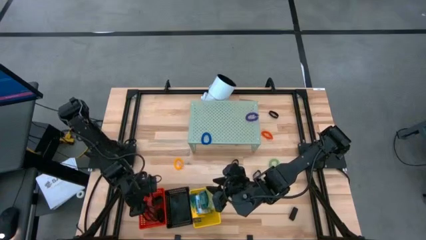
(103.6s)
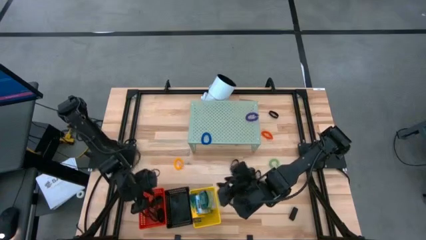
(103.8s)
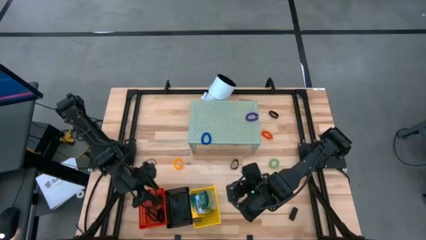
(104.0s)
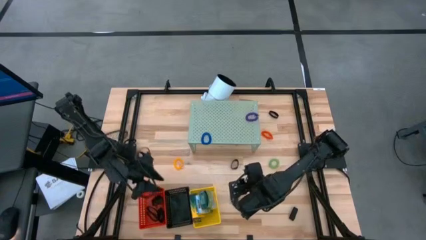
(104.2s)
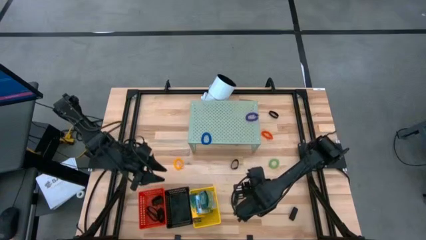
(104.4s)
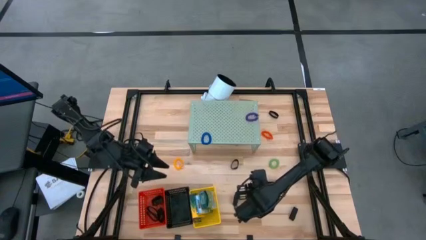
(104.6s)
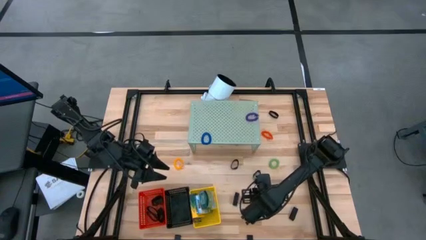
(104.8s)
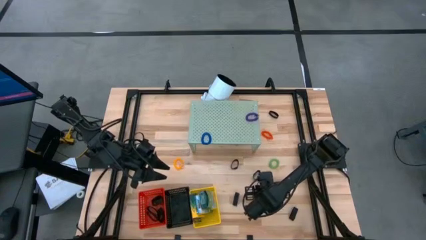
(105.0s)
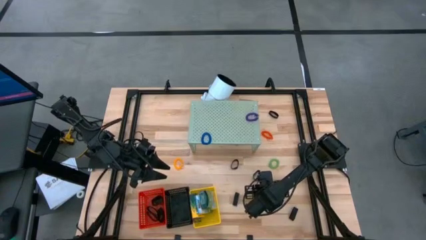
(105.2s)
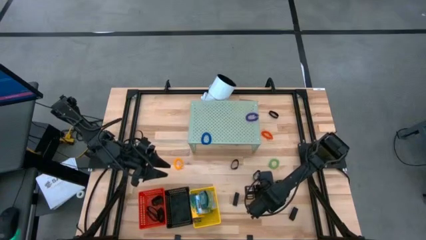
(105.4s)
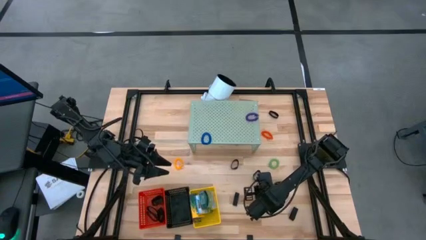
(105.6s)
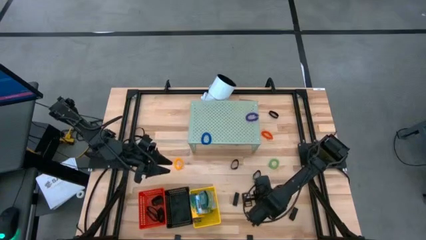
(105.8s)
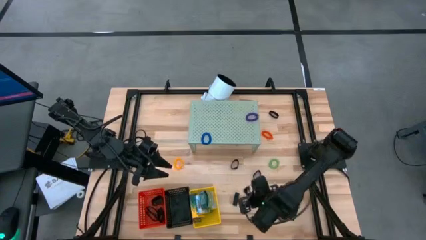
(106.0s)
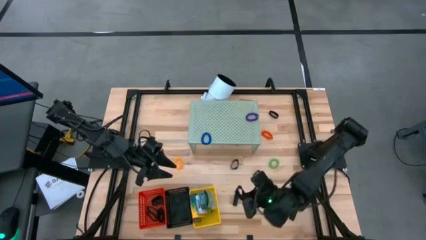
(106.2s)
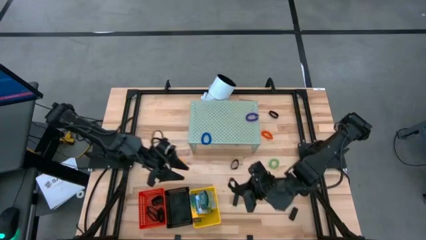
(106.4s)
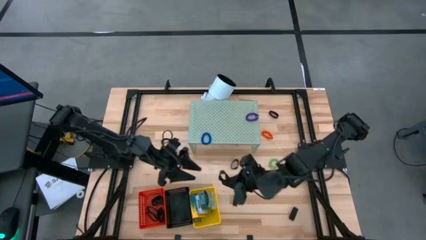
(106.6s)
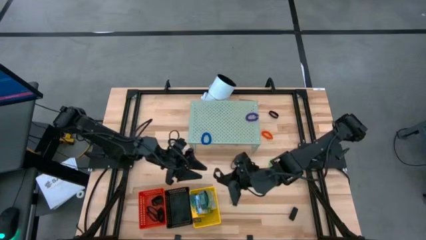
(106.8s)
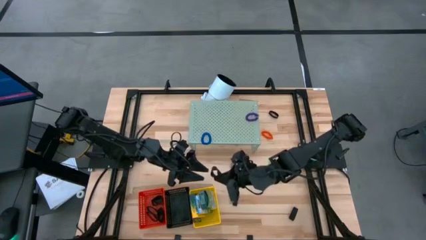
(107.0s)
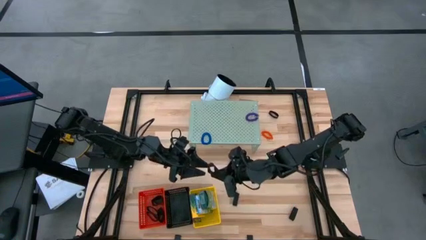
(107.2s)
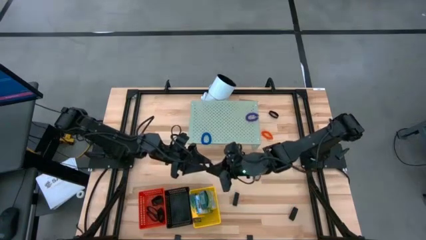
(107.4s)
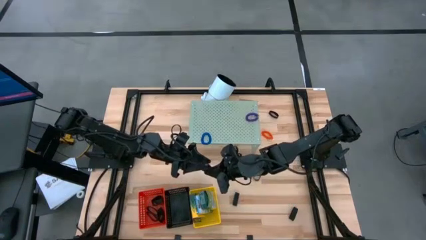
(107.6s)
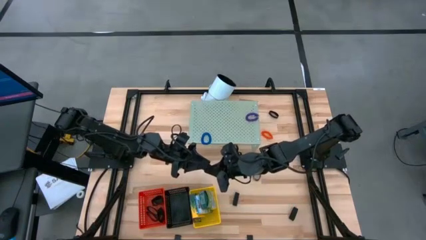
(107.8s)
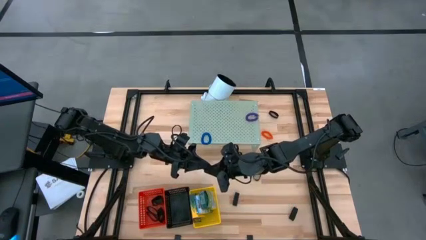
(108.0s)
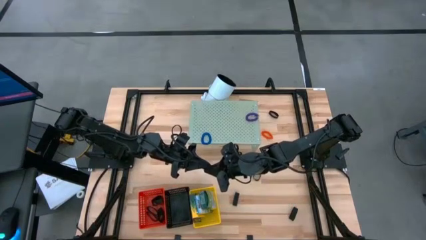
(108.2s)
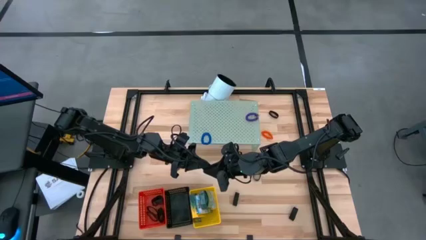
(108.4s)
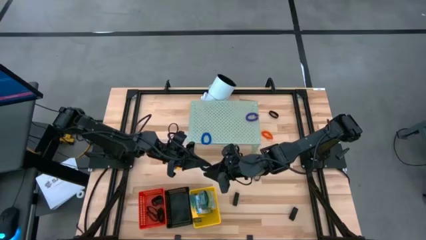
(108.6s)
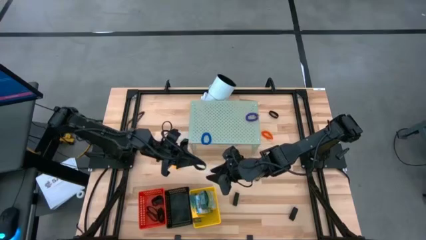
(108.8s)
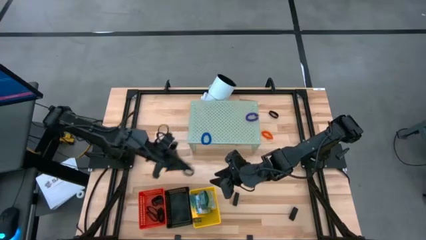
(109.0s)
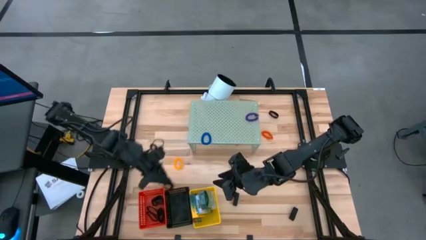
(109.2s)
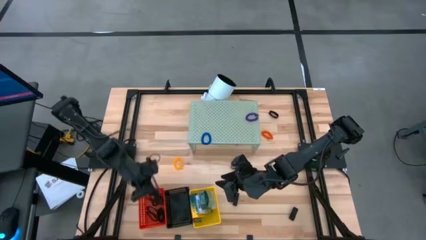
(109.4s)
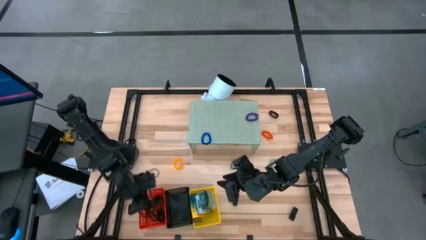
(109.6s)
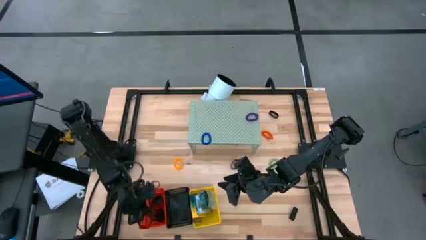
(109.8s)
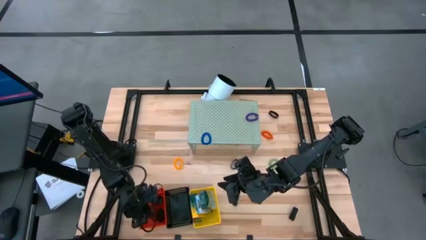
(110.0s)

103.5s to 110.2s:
Task: Pick & Place Office Desk Supplies
Put the black rubber band into the red bin

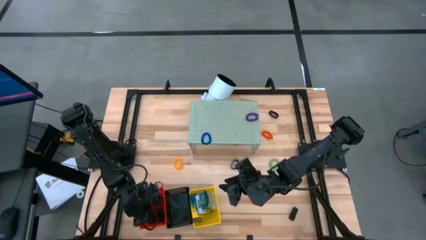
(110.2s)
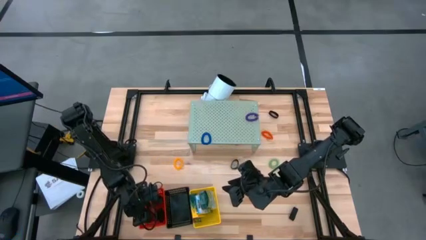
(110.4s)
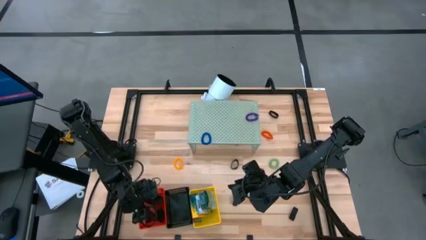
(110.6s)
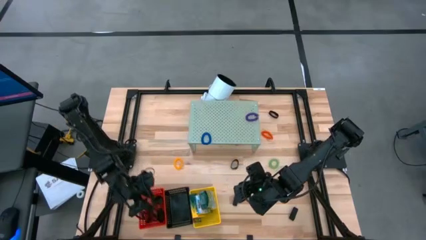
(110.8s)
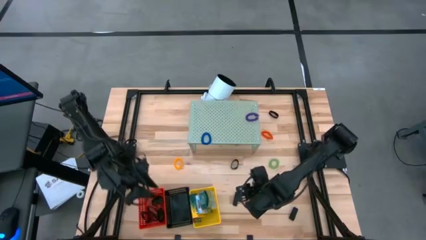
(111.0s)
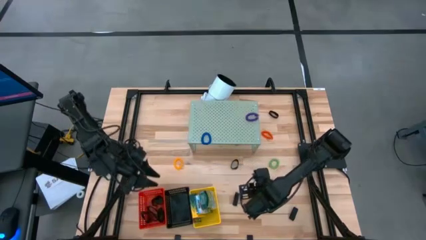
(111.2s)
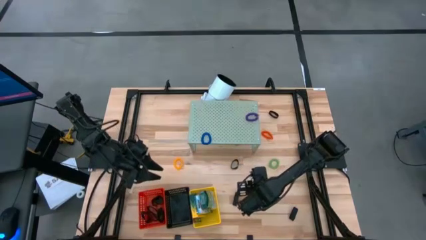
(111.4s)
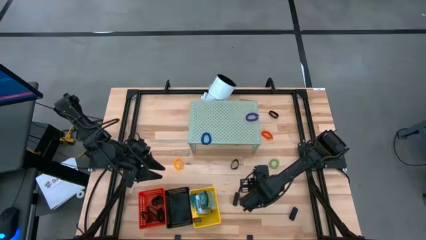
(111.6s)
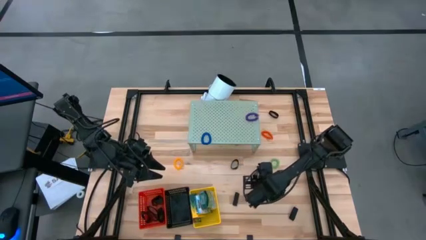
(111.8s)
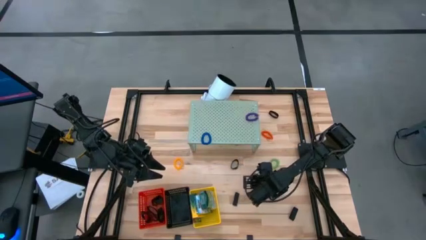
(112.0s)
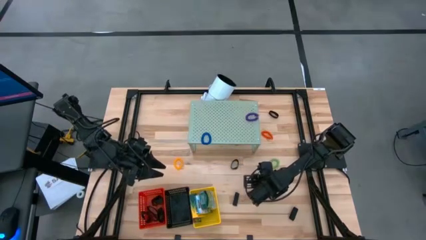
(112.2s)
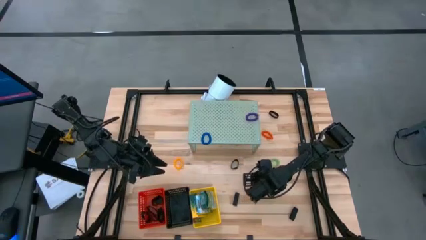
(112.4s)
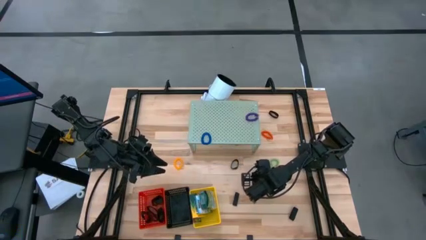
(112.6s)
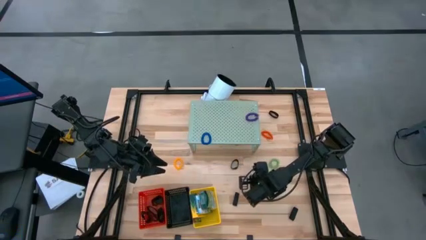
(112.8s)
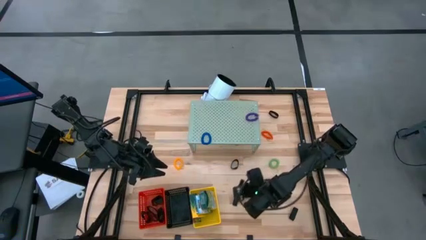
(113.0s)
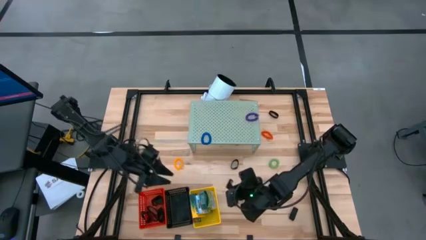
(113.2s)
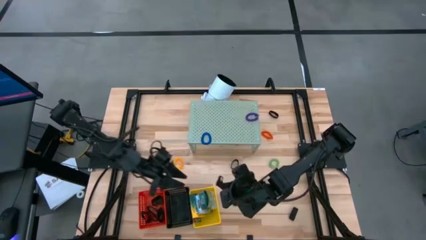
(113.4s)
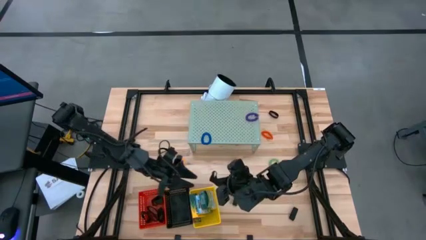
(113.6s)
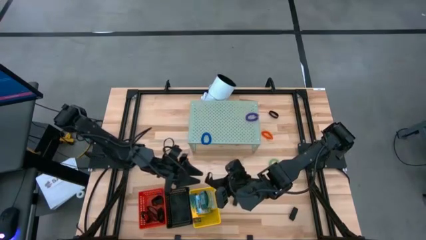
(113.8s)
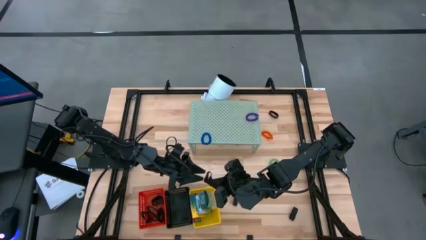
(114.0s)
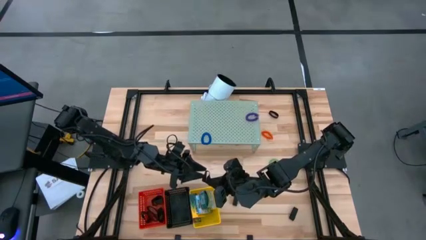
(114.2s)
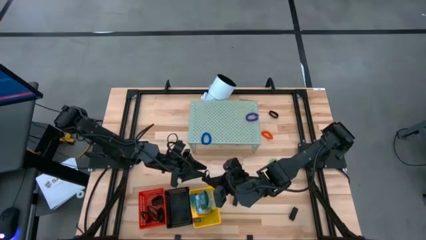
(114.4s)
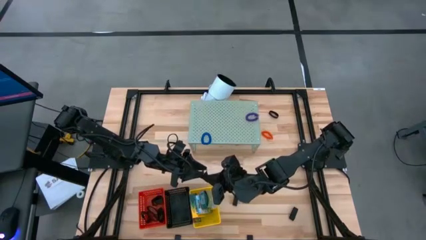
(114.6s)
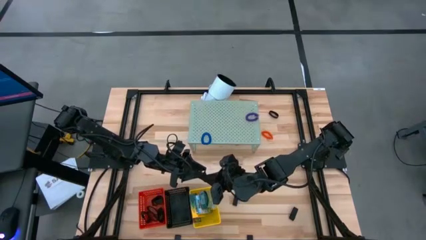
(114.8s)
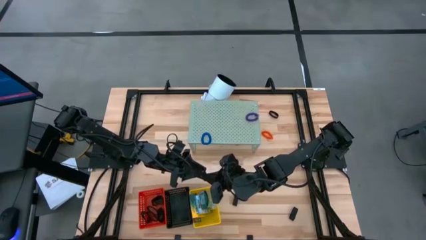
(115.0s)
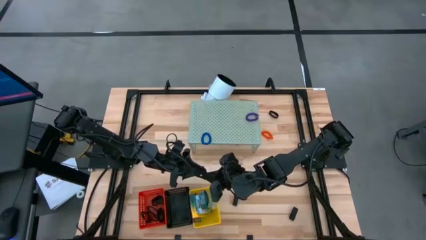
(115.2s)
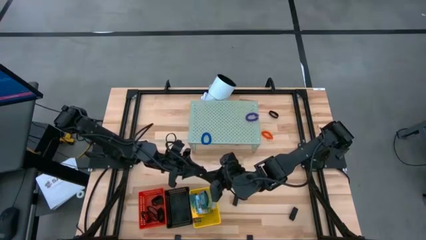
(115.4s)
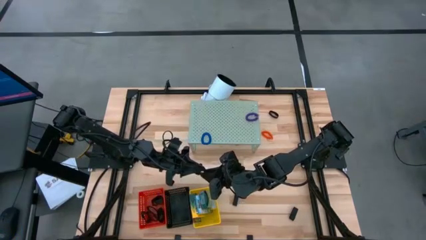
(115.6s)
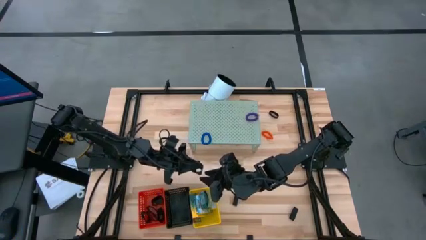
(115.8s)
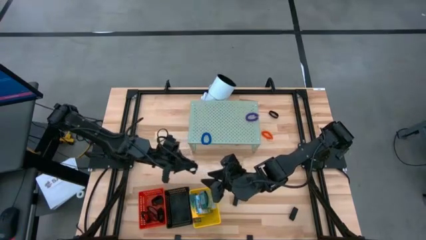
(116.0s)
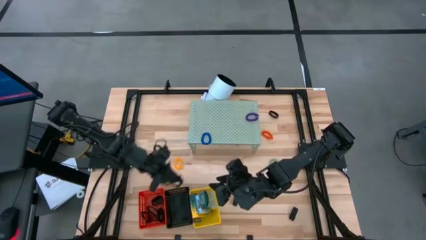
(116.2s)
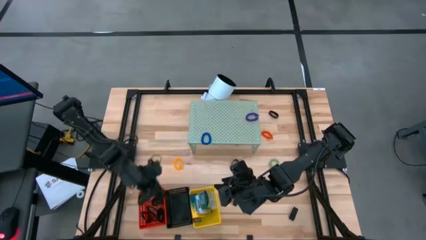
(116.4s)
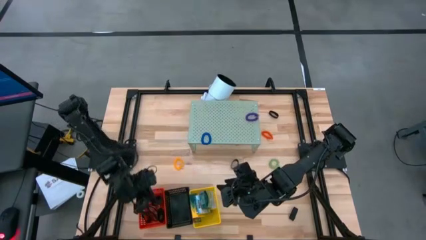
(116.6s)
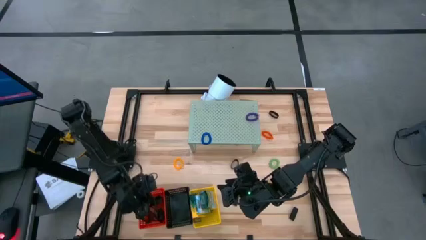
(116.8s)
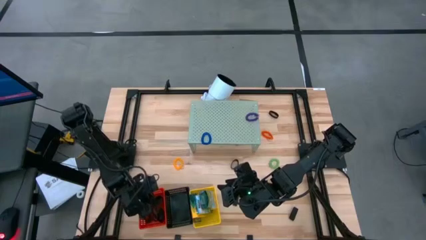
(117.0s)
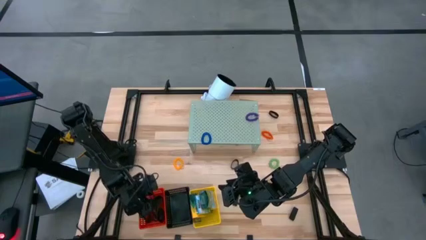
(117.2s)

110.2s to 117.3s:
Put the black rubber band into the red bin
